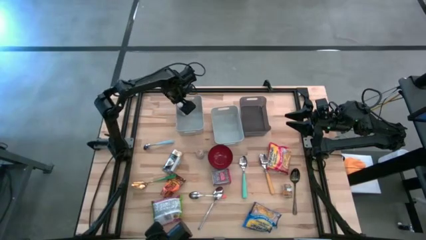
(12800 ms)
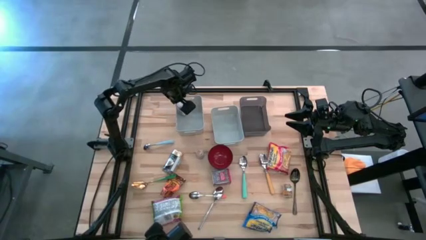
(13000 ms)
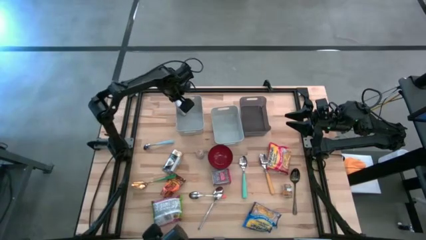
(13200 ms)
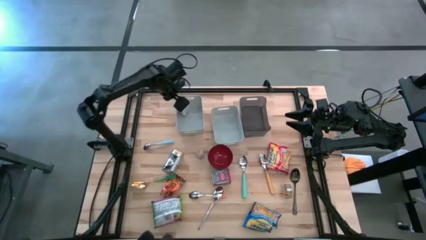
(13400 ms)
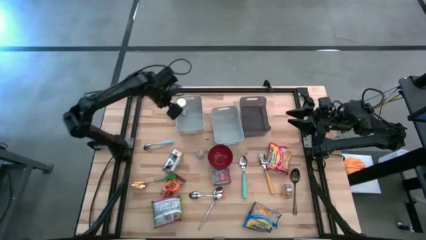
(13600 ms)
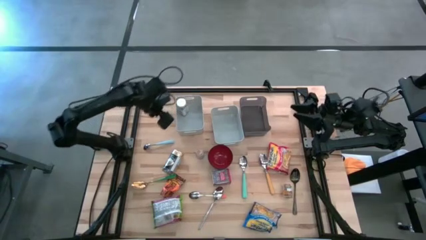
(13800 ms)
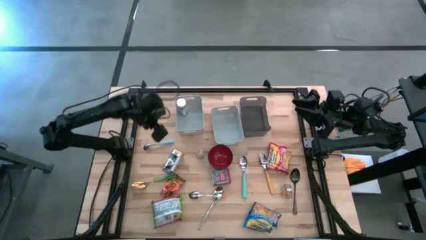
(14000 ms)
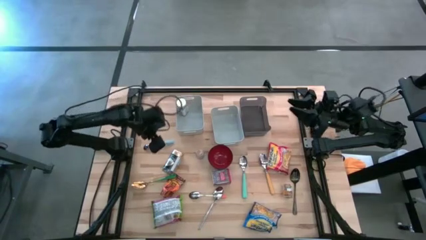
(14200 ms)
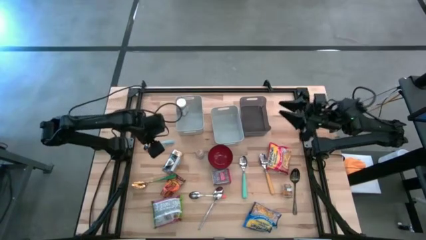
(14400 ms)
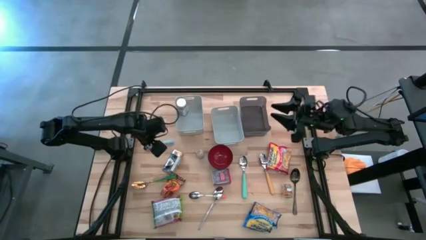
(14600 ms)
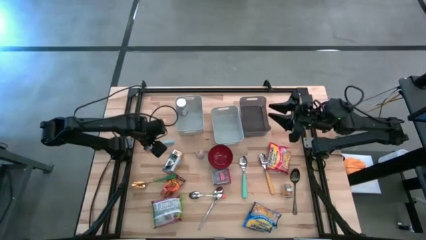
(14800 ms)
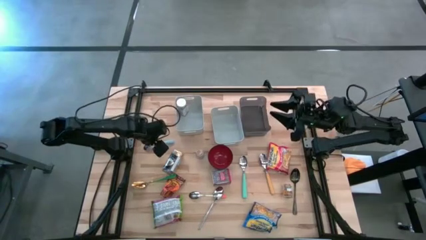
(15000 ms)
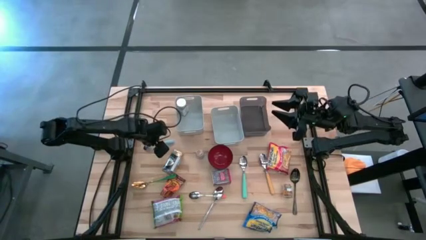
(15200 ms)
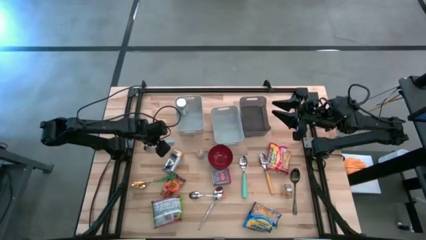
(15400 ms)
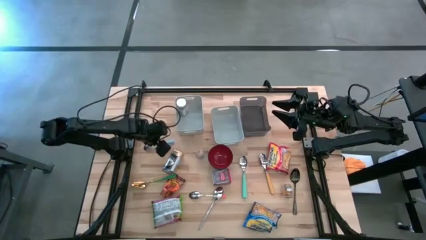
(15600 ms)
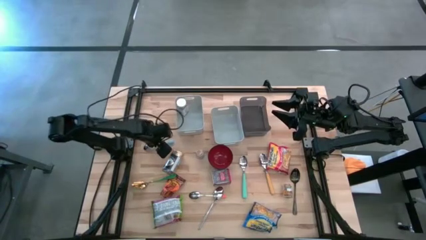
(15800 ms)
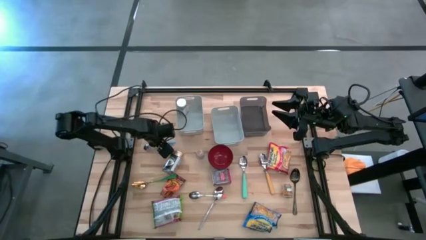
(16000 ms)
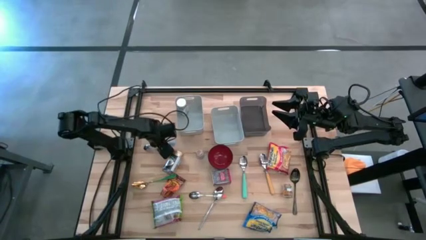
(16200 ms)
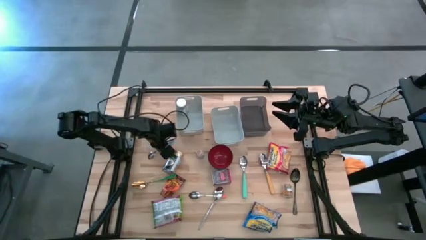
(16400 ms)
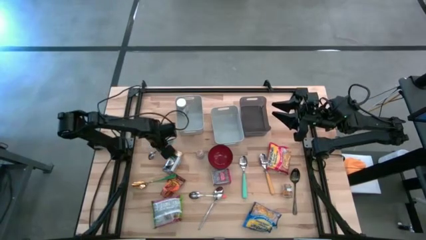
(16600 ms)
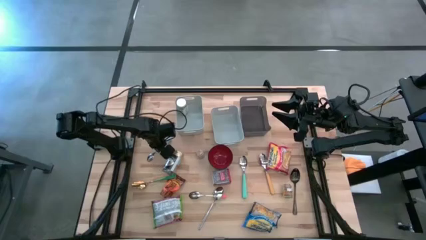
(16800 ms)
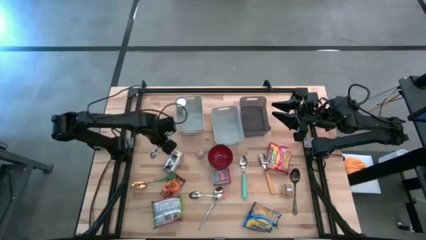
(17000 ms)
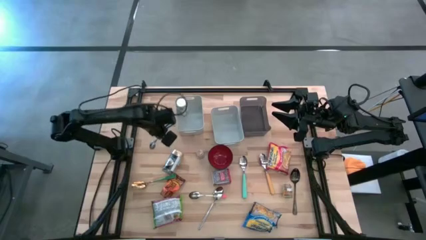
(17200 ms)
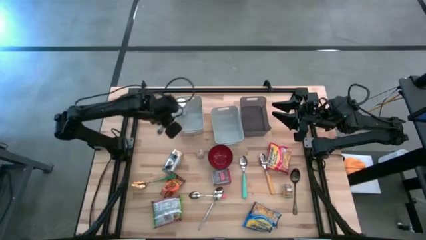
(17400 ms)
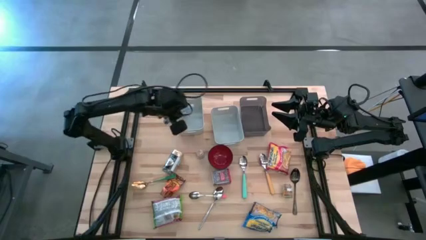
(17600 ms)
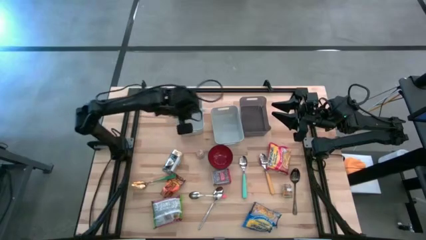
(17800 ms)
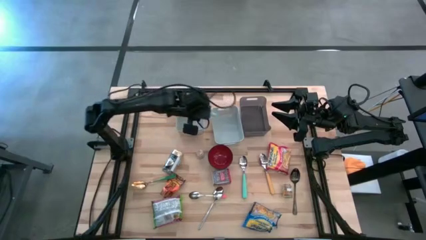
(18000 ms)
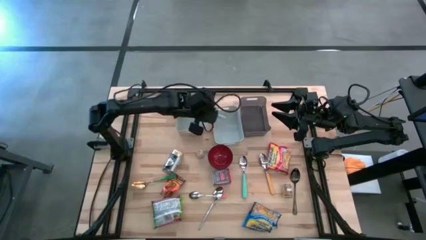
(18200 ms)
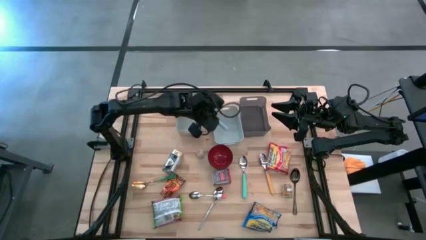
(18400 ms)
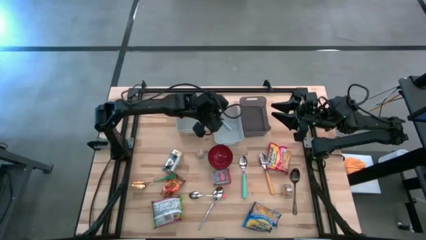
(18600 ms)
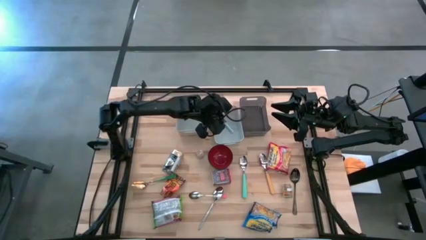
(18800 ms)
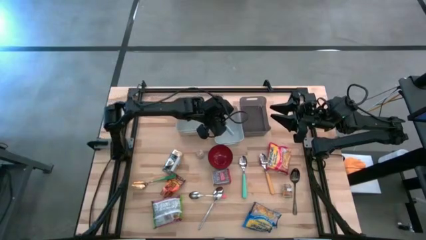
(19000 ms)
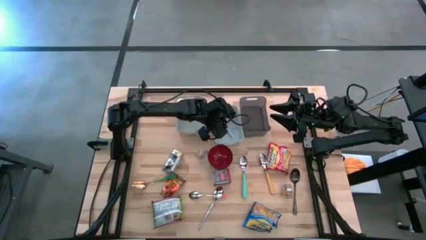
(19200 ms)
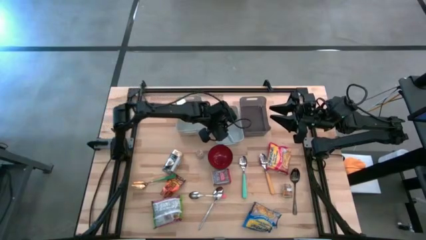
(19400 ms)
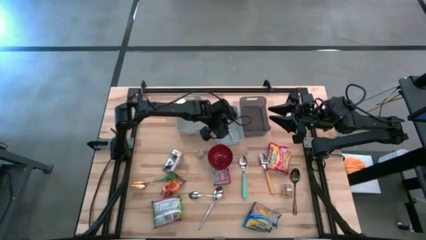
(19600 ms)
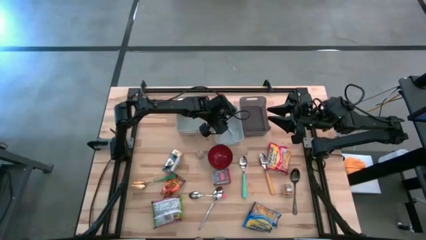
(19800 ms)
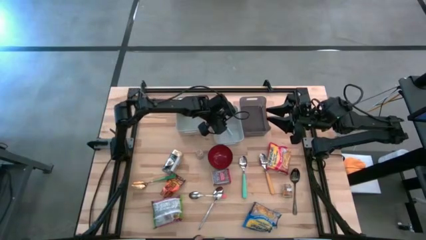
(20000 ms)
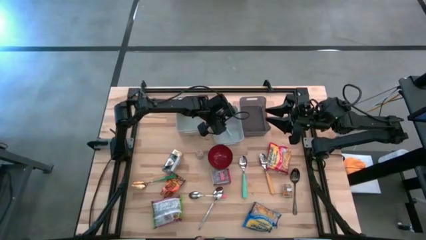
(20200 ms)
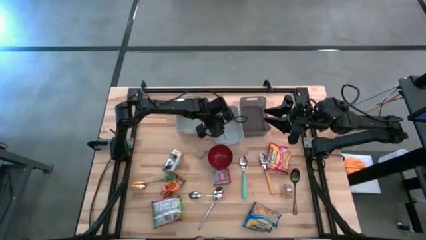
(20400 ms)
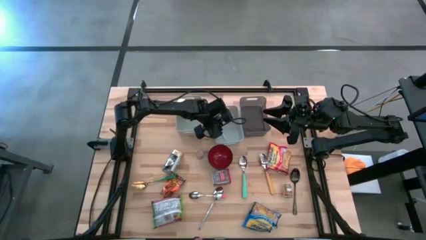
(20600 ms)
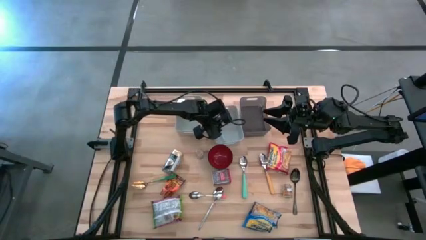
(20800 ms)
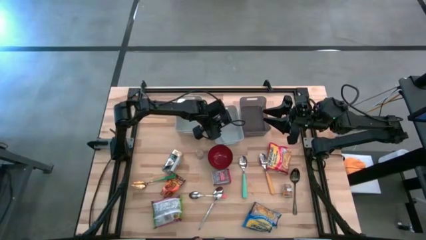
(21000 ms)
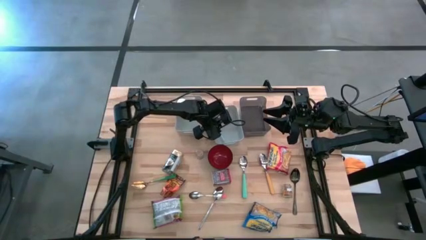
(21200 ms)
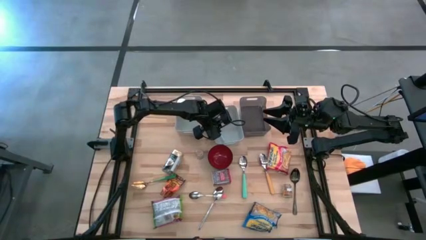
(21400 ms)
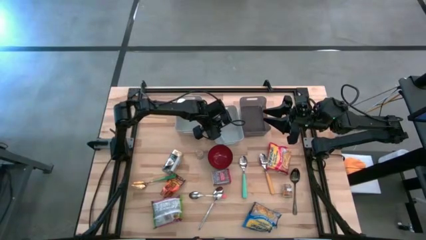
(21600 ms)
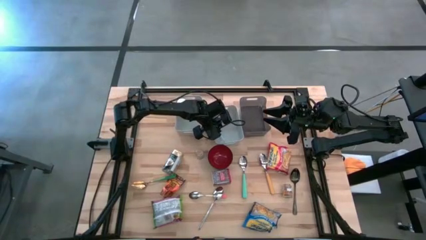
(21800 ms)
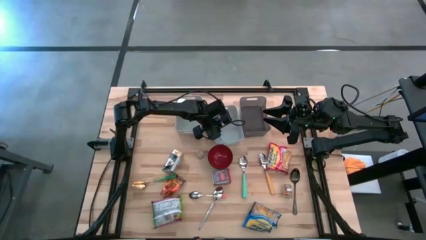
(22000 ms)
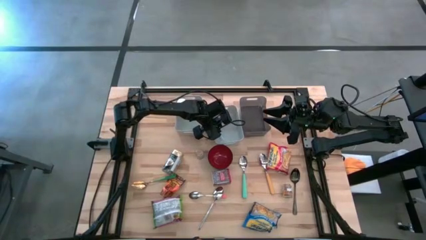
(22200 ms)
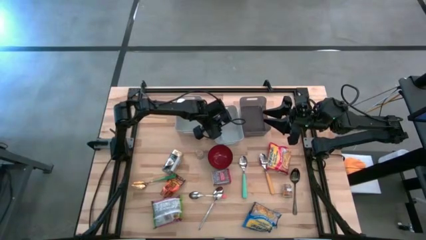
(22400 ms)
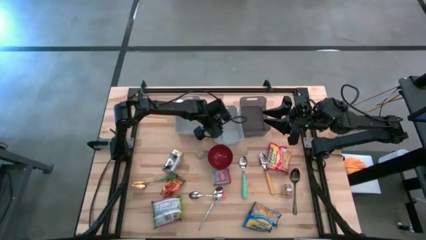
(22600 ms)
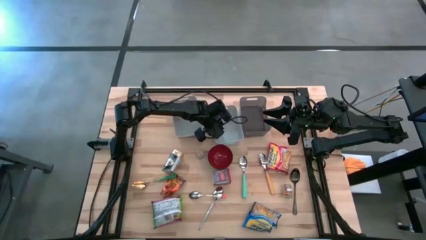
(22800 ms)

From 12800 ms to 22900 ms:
Put the light blue spoon into the right white bin

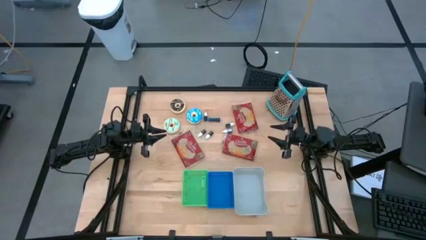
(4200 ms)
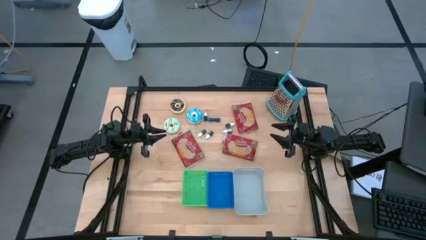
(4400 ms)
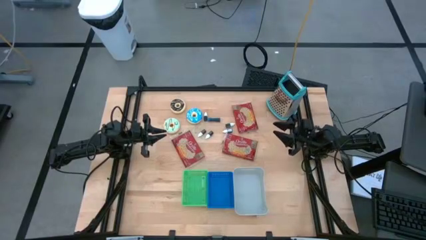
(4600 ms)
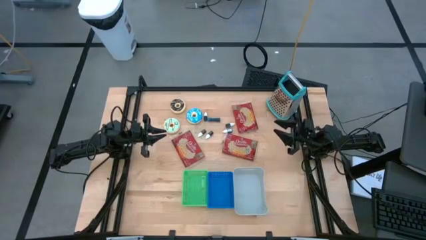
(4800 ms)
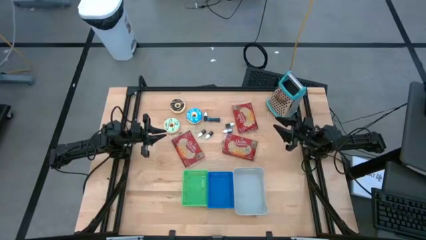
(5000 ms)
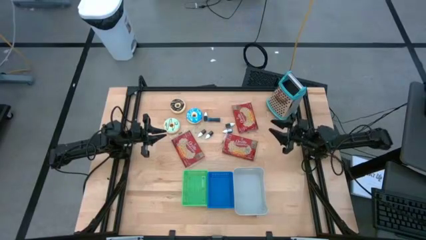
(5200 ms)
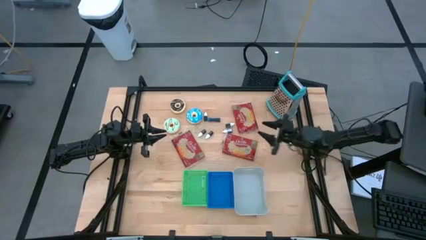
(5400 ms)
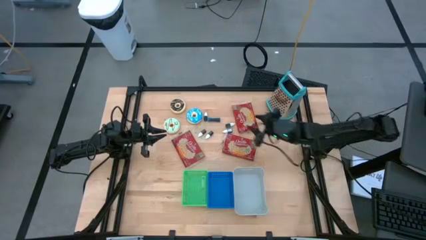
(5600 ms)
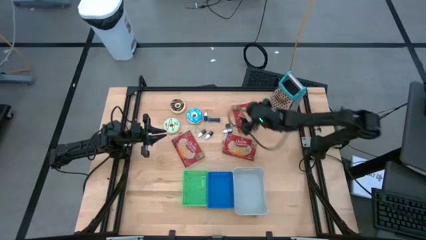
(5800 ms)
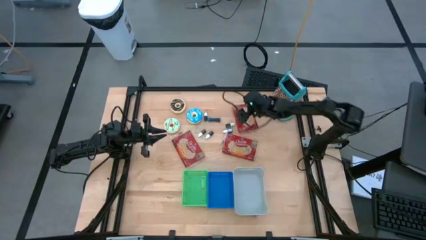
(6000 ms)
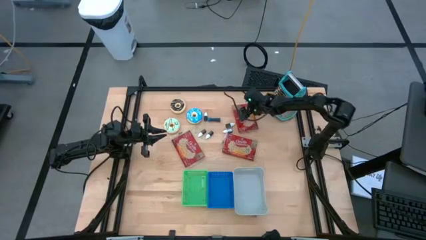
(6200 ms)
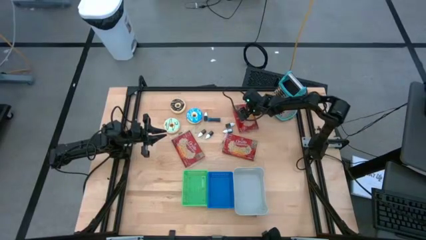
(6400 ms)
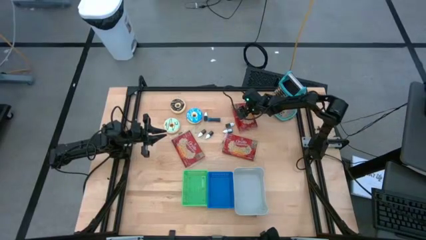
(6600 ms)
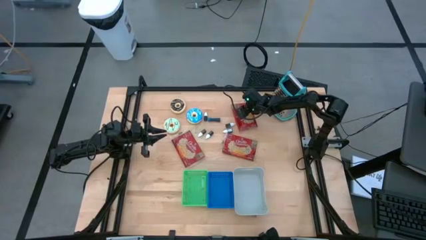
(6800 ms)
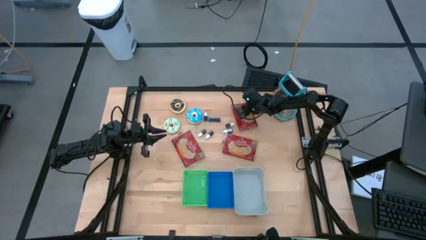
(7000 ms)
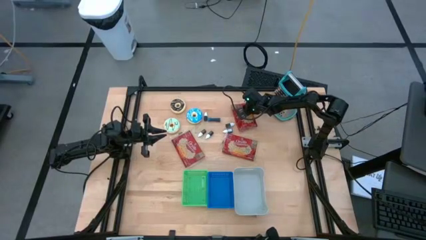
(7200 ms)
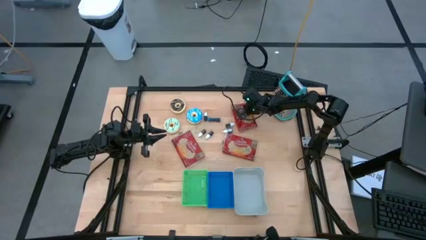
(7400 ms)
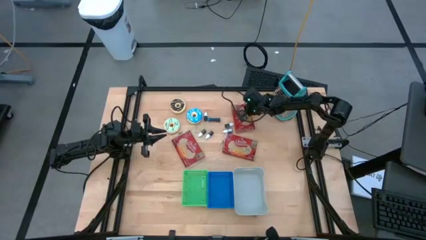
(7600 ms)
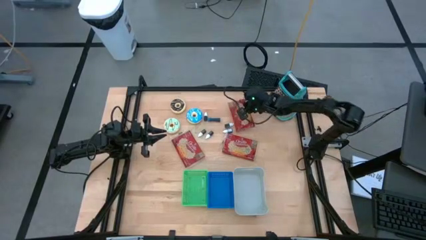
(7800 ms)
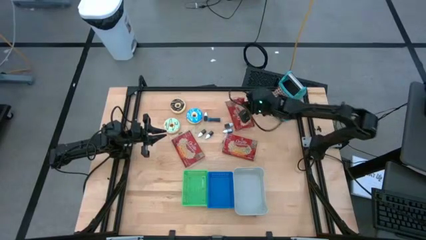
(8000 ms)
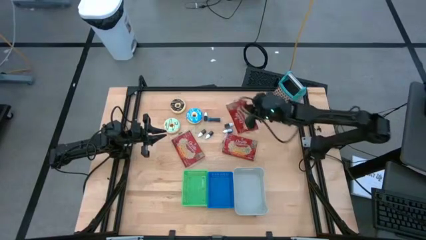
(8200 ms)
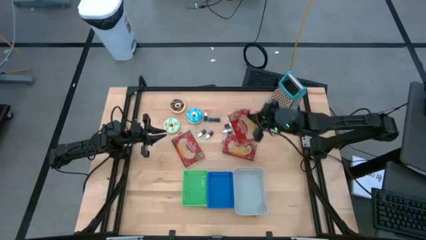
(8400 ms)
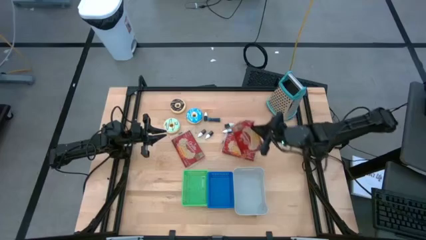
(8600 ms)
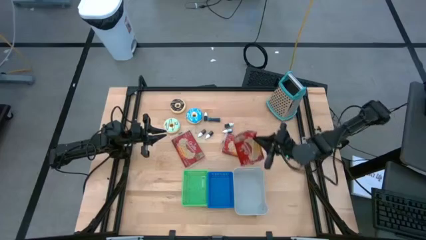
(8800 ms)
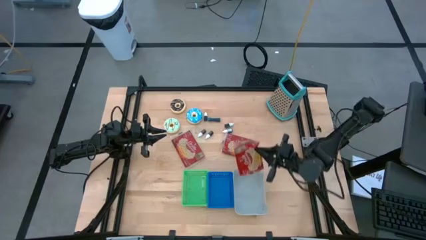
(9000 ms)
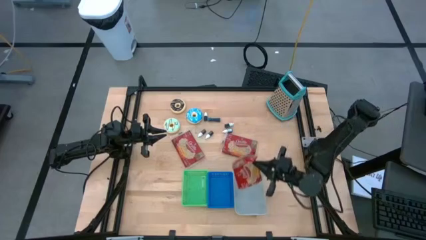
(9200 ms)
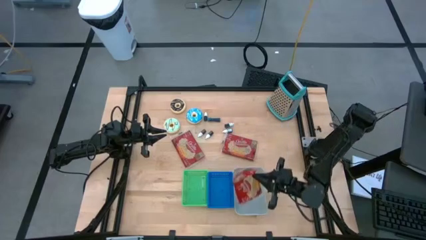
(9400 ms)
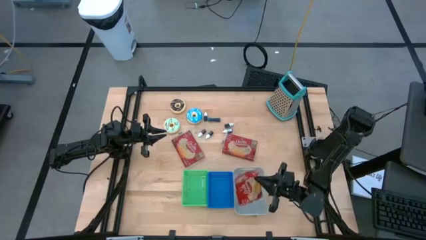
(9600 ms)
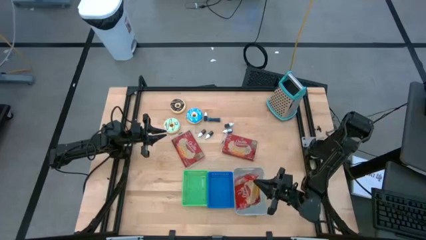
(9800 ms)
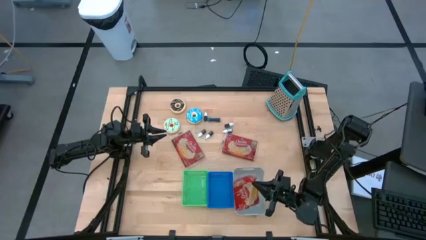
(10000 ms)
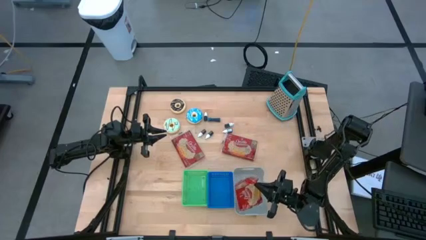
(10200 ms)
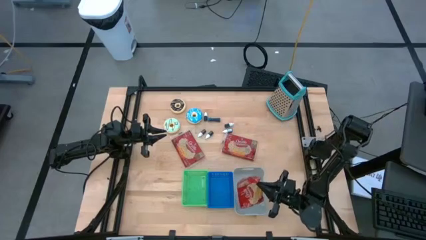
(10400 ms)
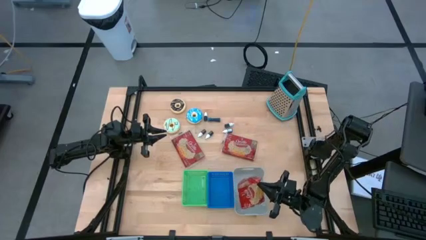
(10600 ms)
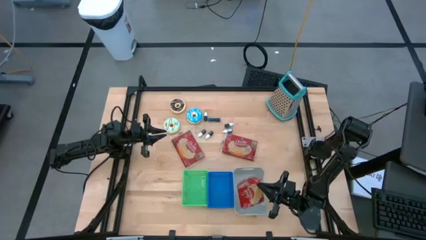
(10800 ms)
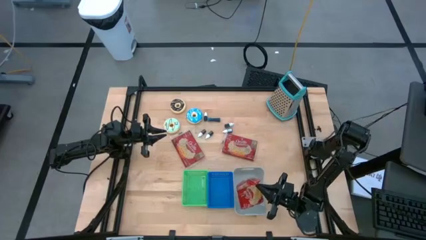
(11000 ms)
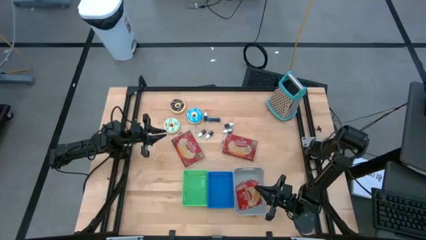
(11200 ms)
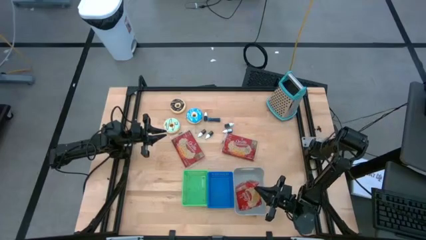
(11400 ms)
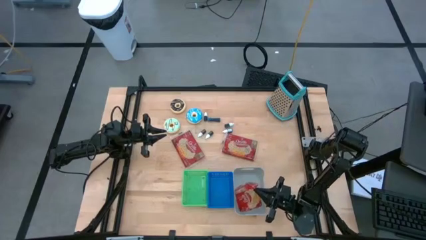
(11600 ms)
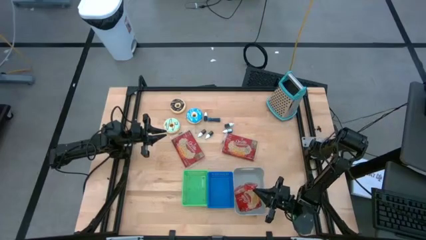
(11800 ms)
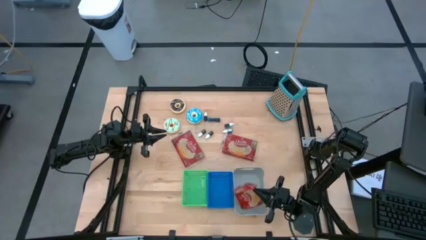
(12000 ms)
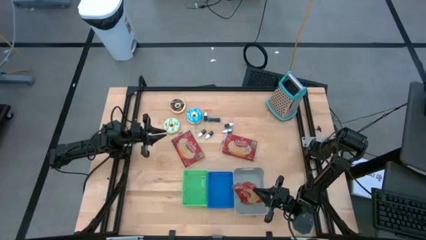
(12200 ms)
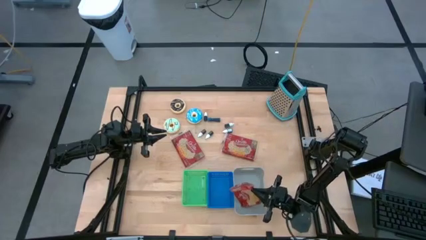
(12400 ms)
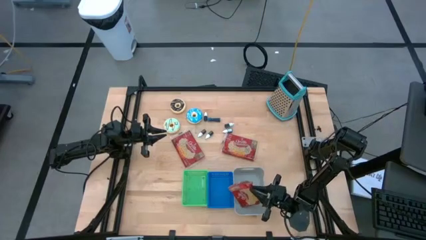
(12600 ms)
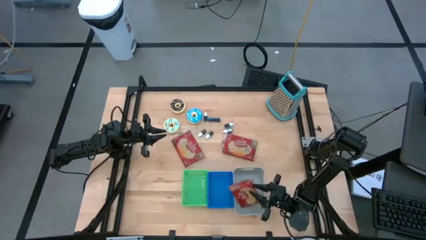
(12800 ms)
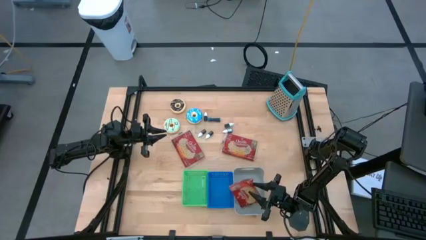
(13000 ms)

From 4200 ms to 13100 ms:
Put the top right red popcorn bag into the white bin
